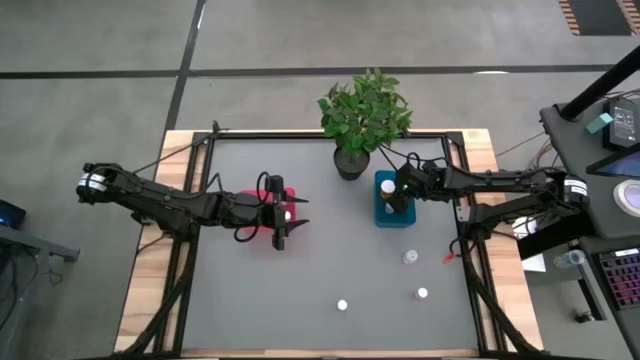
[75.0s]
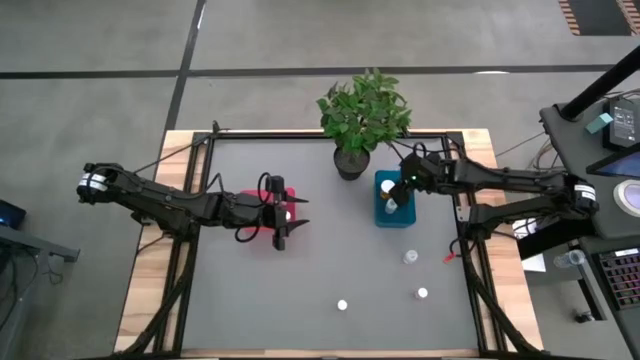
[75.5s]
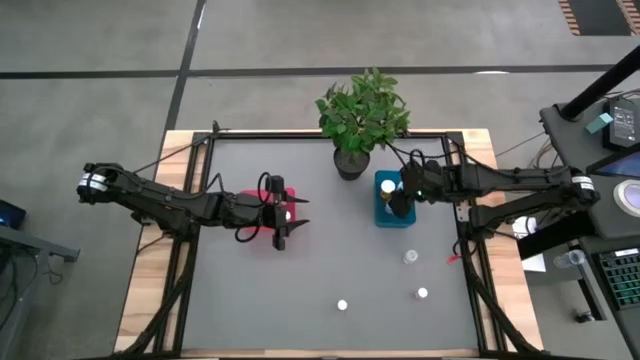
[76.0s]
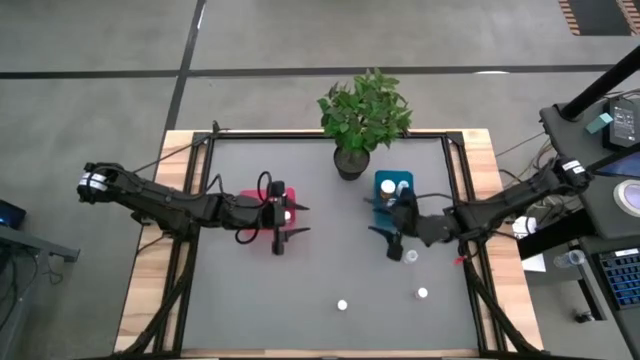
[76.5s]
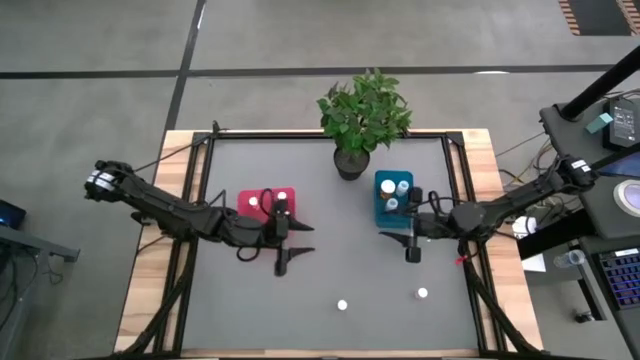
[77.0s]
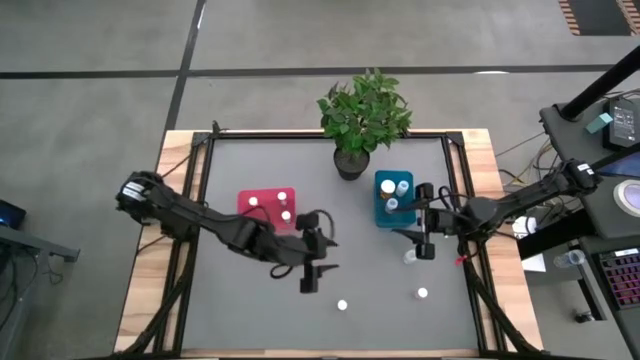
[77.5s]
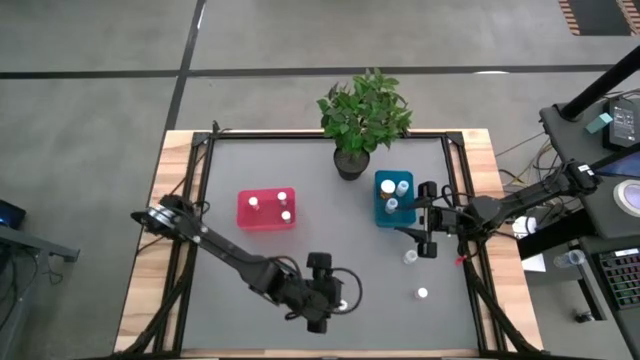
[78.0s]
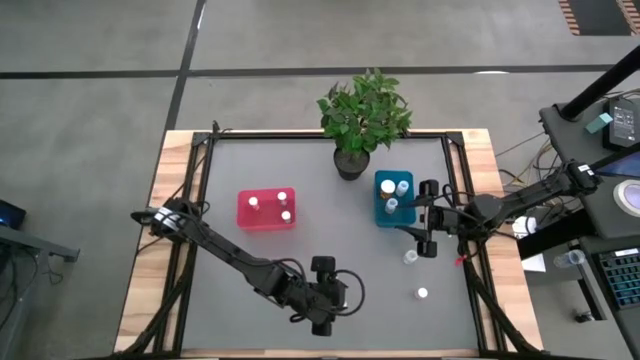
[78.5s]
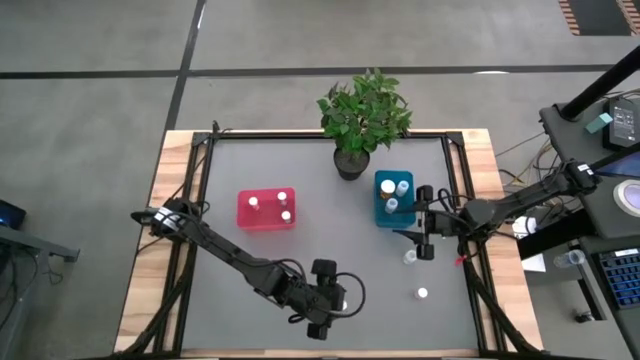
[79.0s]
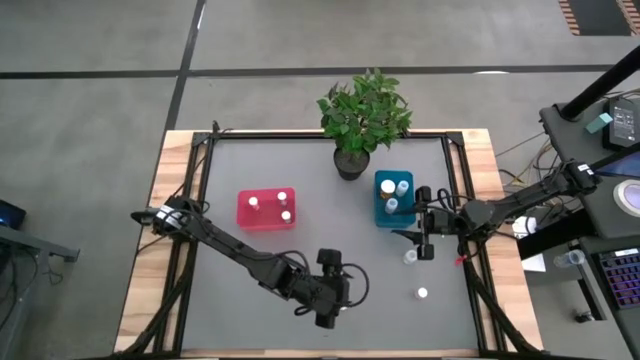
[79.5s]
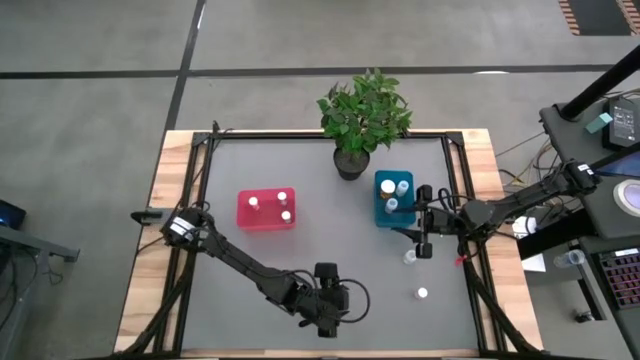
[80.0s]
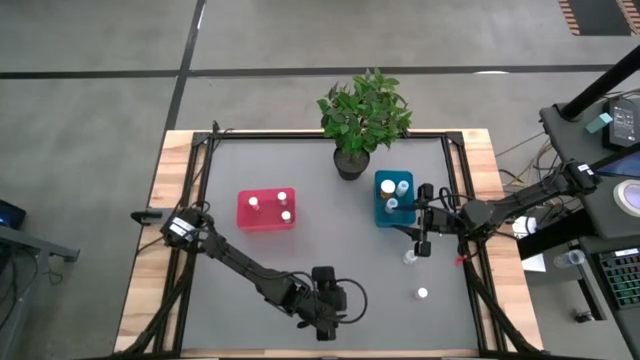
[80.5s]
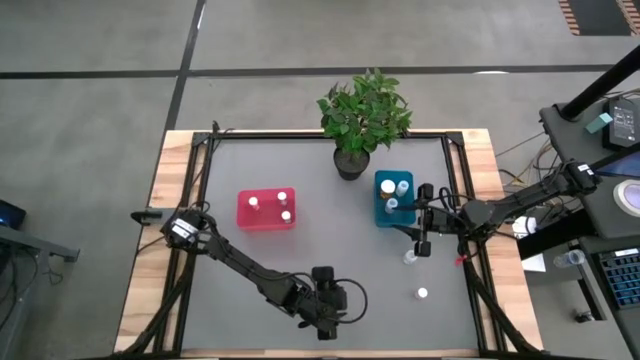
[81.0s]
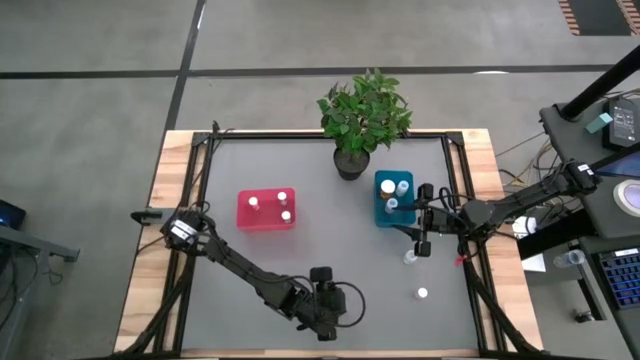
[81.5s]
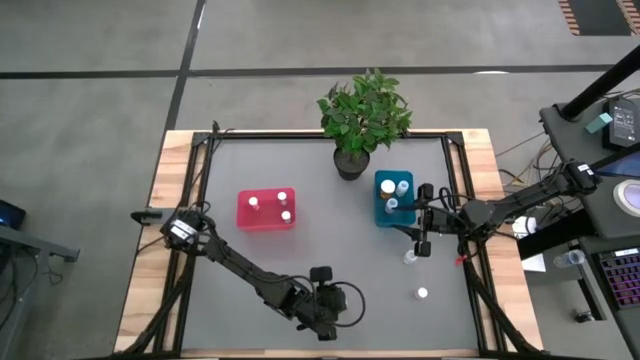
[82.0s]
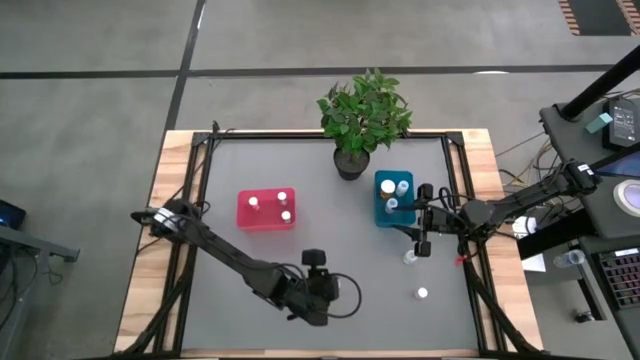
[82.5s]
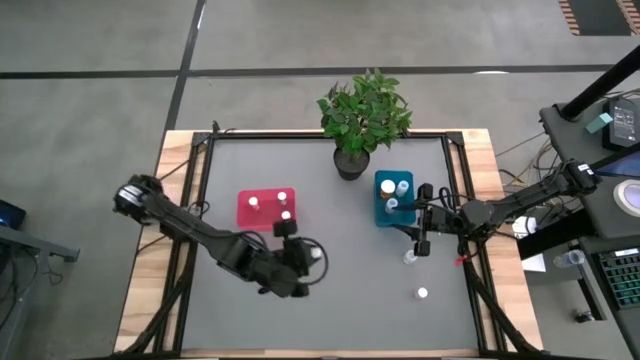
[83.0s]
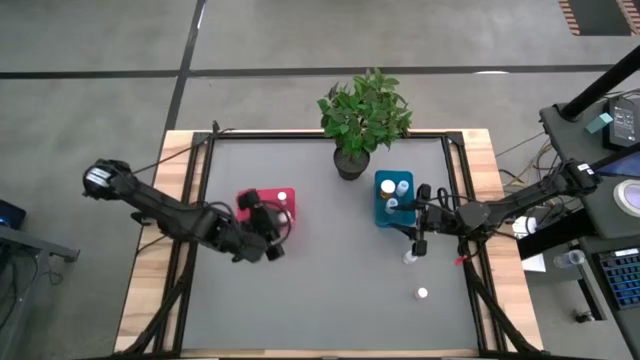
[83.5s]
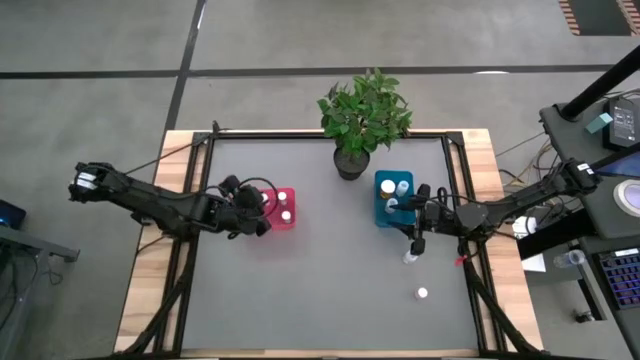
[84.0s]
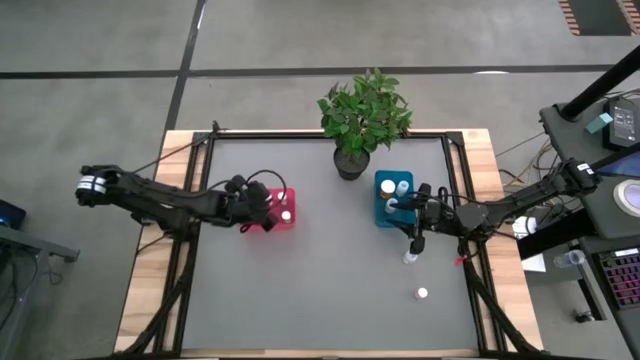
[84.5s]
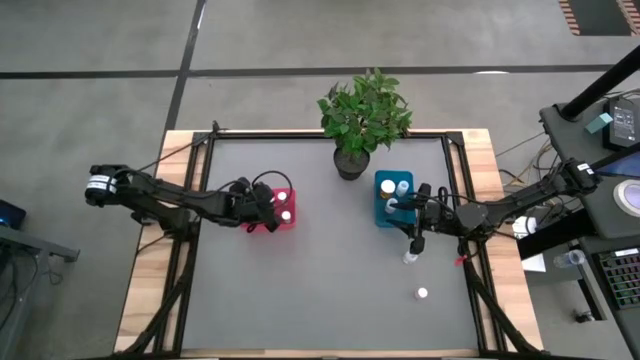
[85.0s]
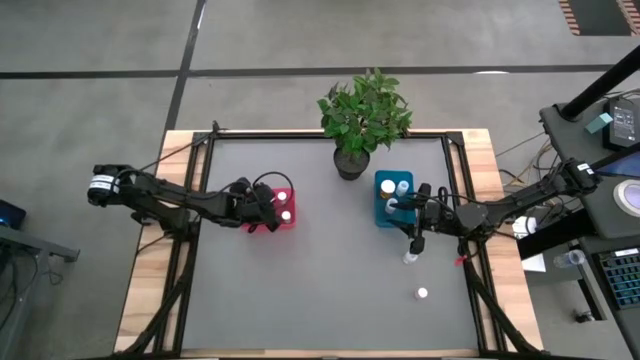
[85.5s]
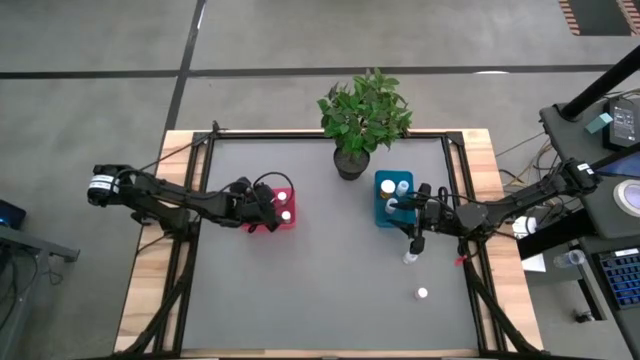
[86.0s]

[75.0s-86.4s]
Task: Pick and place medicine bottles into bin by pill shape (circle, oval)
Put the small pink pill bottle into the pink bin

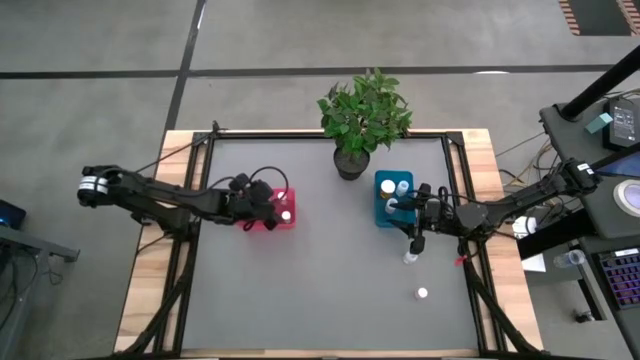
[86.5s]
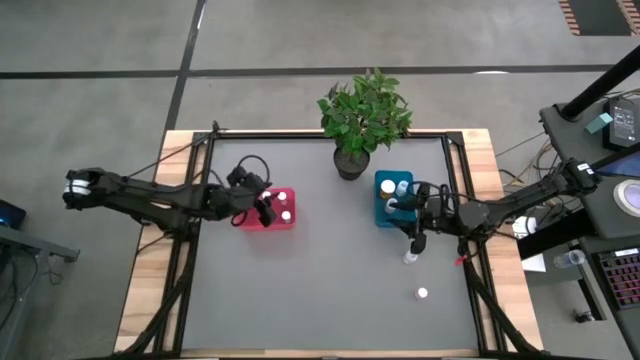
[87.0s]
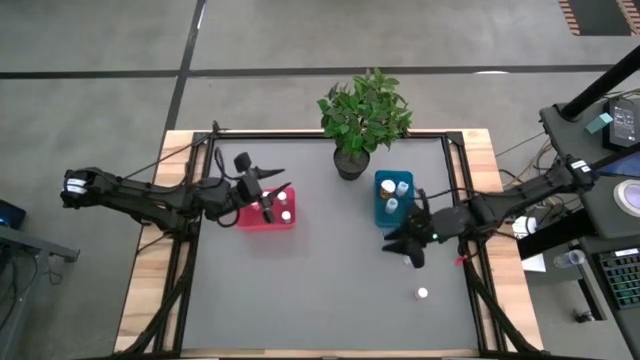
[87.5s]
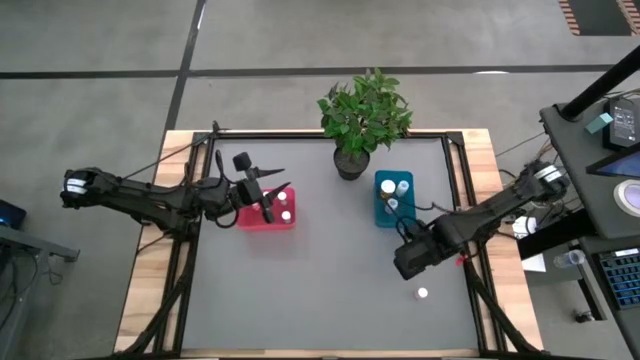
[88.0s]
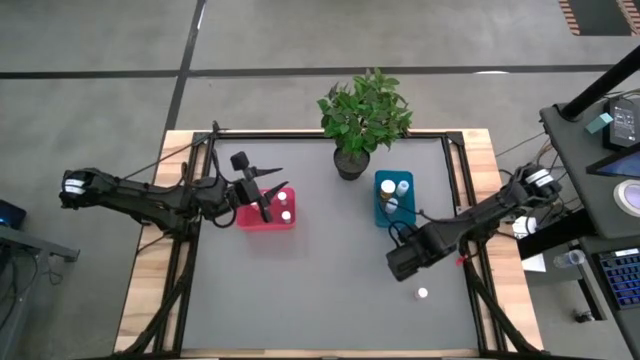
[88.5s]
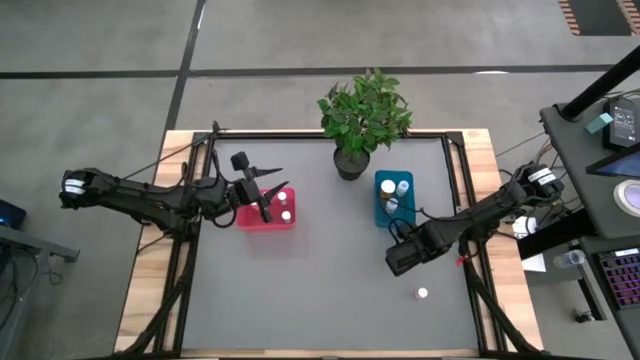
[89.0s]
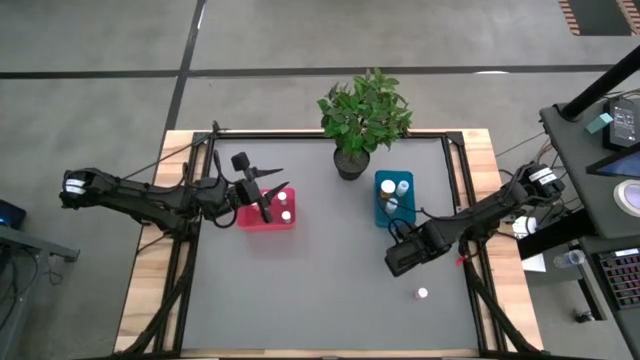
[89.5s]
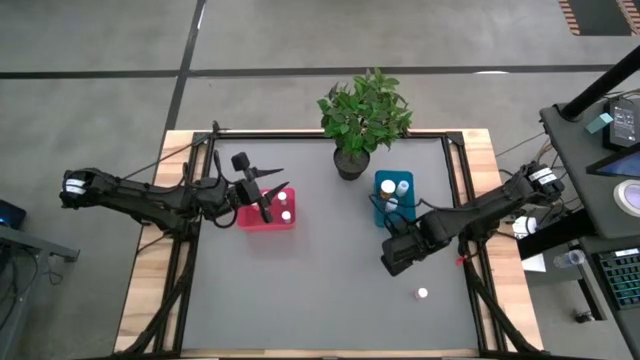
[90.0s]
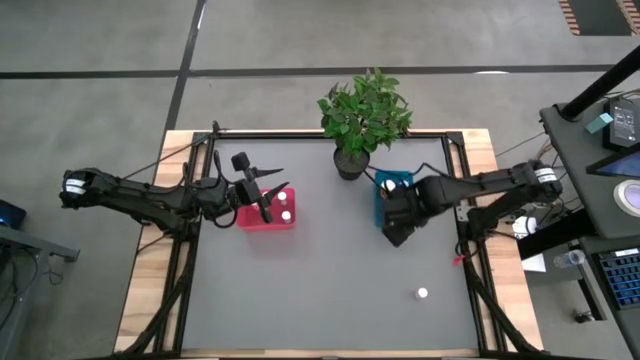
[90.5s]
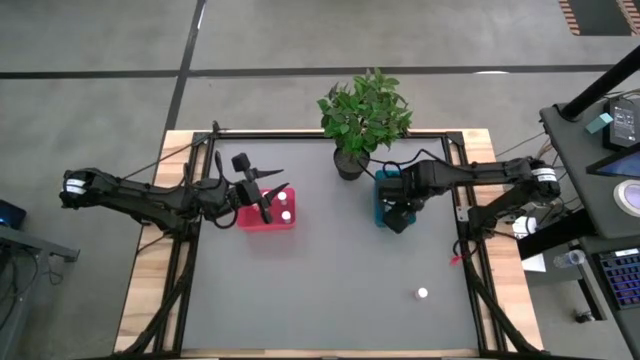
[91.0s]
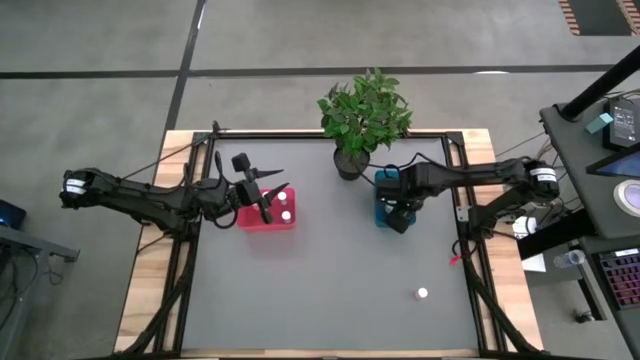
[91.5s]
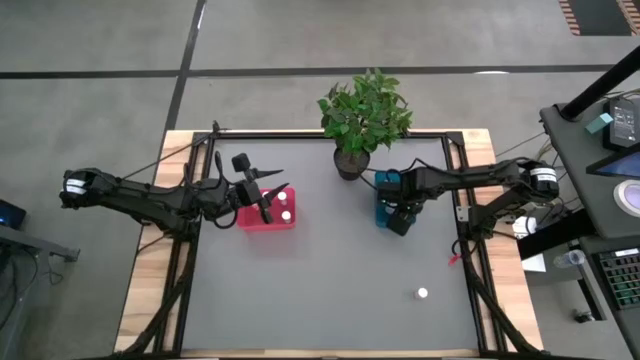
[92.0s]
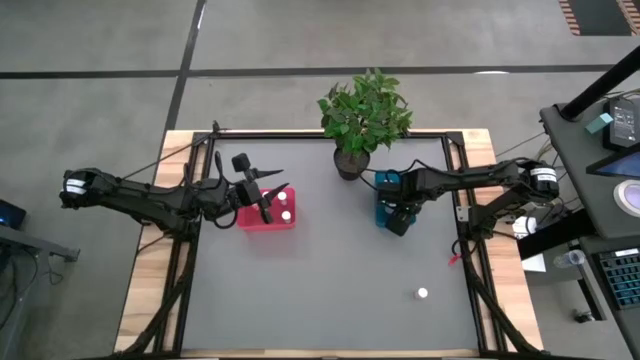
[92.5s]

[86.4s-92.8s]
Put the small transparent pill bottle into the blue bin

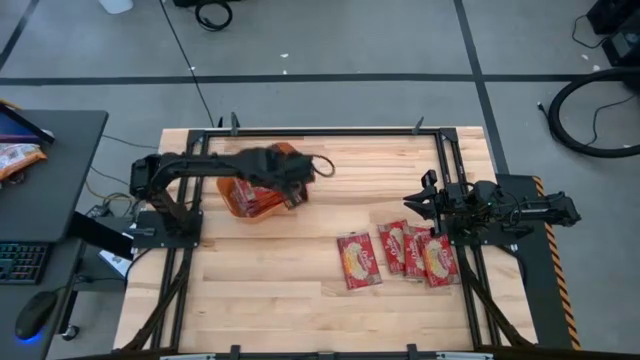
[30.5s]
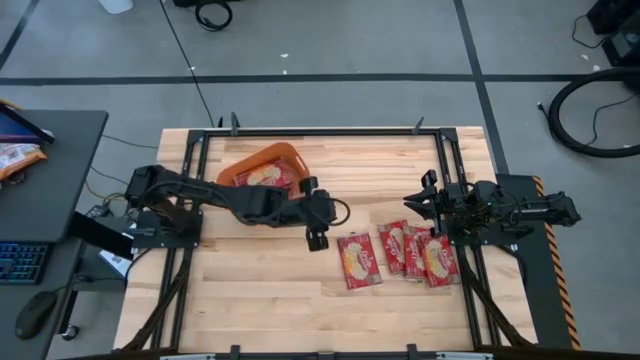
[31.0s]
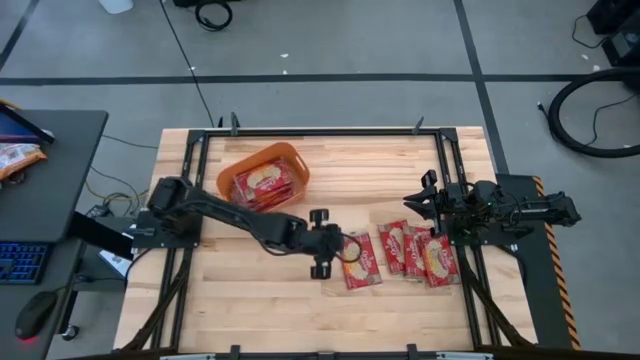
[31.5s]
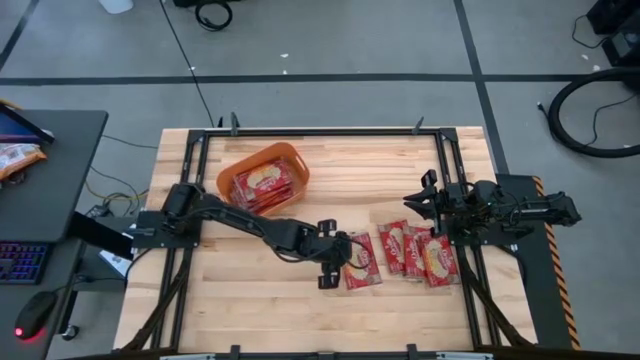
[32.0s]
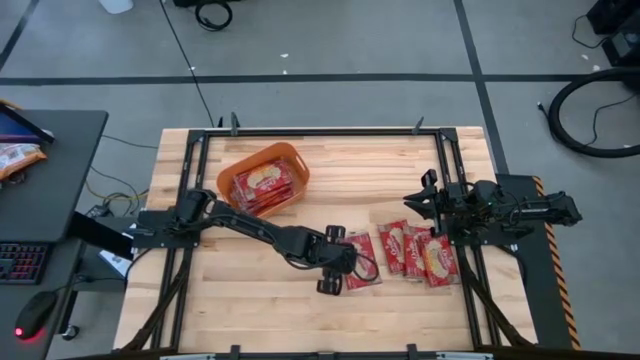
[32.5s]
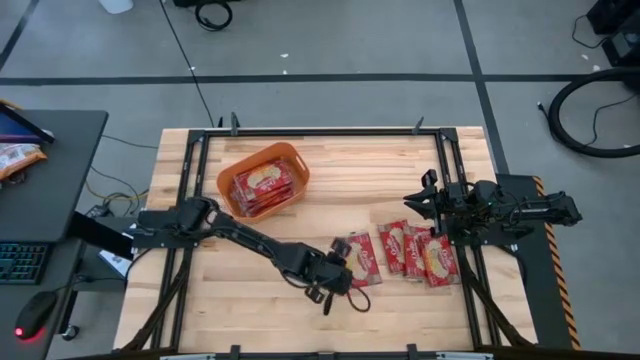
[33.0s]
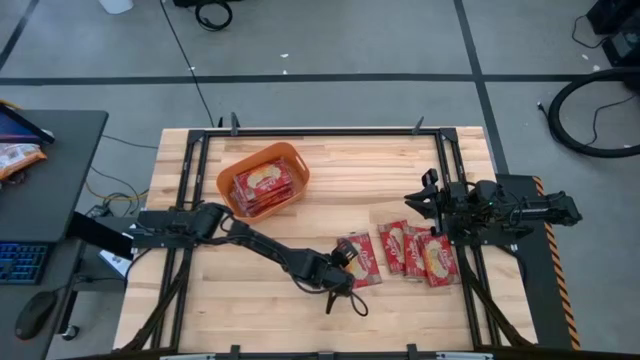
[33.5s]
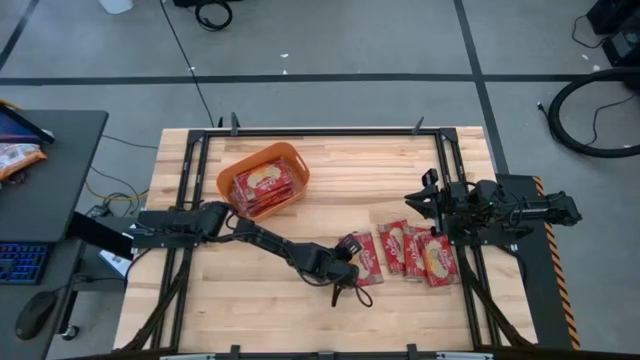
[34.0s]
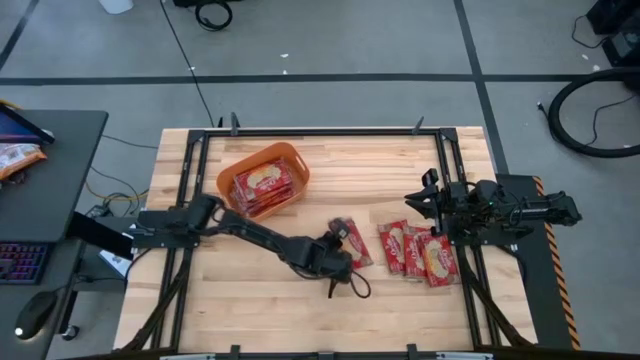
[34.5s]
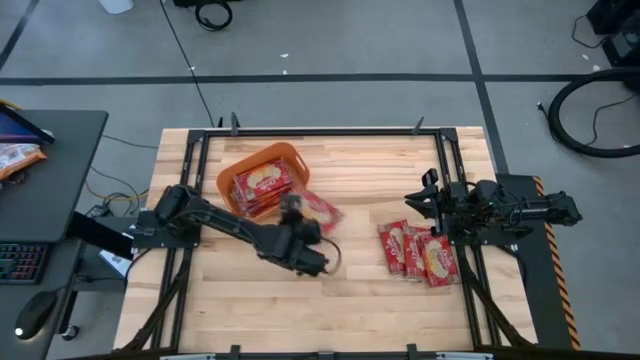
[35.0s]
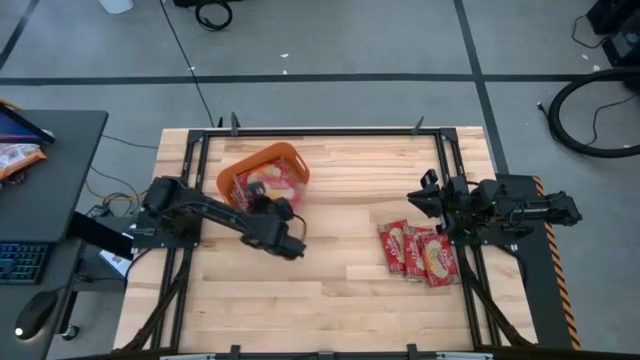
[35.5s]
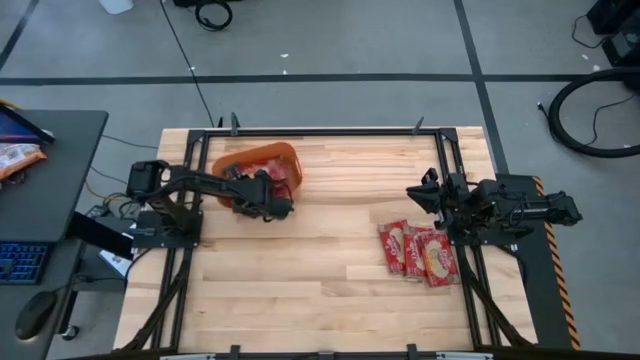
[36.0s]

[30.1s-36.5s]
Task: Sort popcorn bags into baskets
Put the popcorn bag into the orange bin
